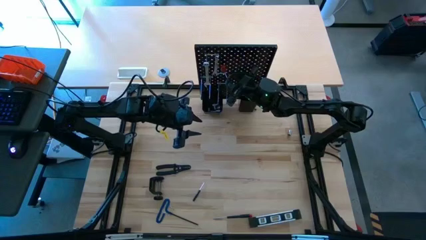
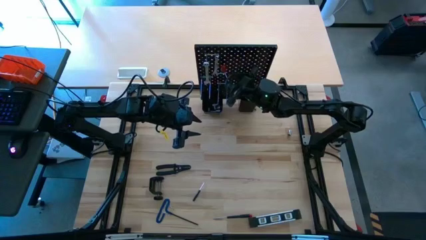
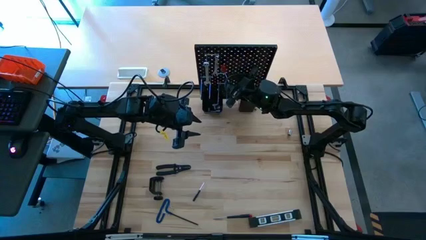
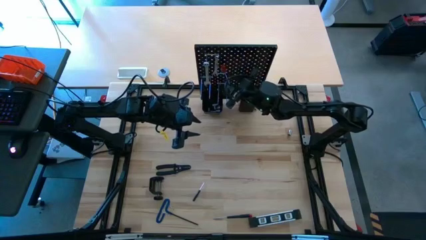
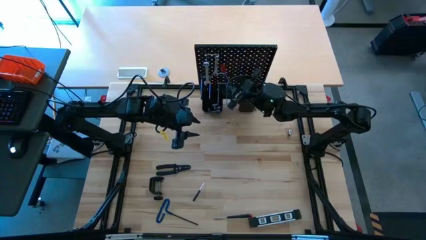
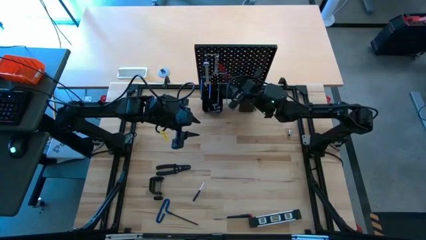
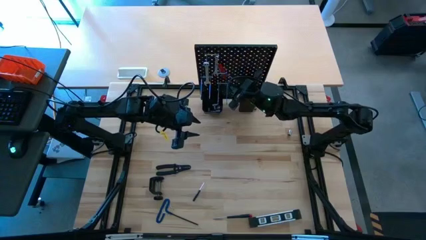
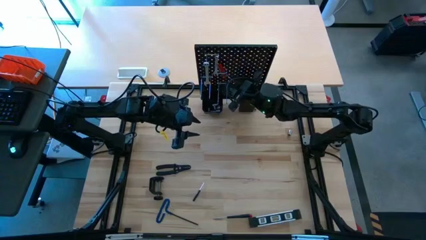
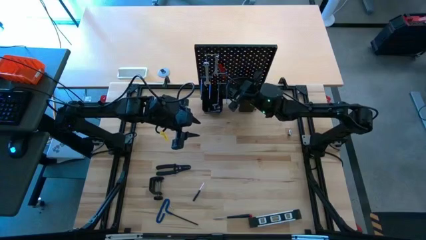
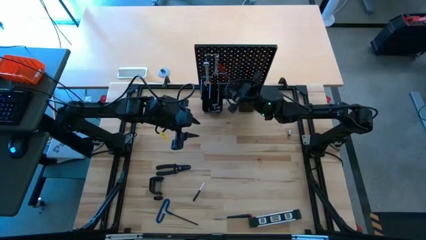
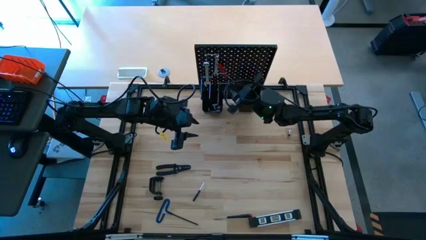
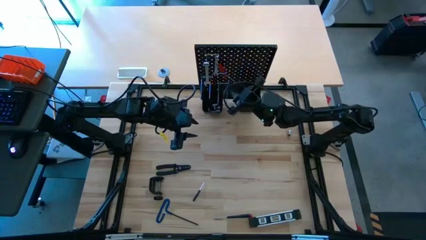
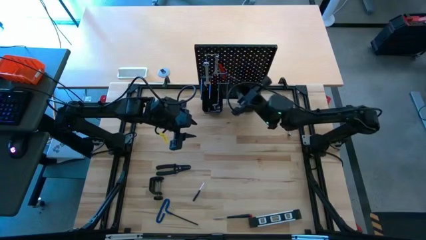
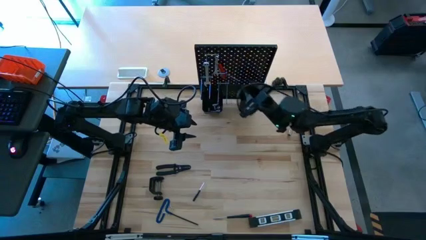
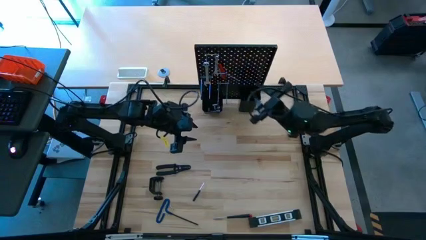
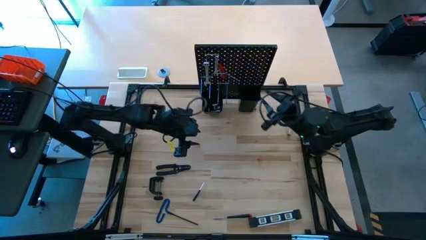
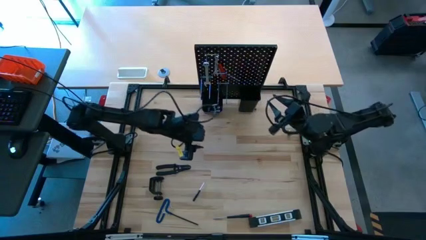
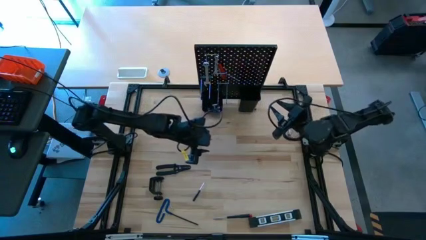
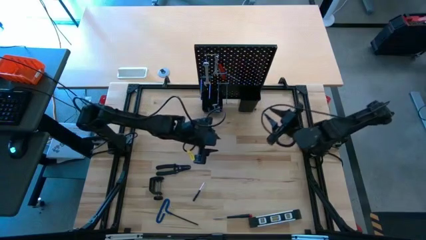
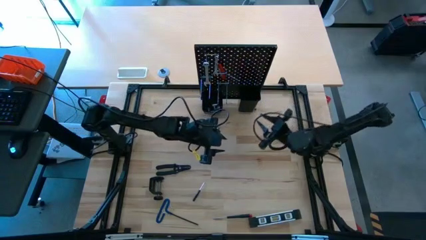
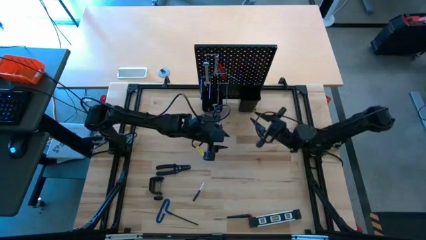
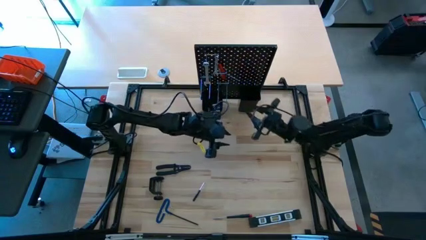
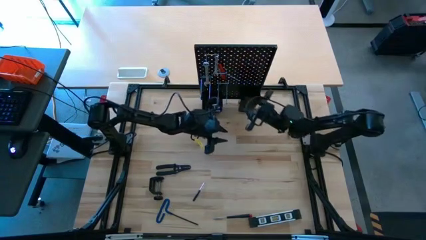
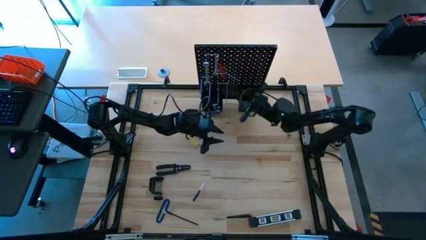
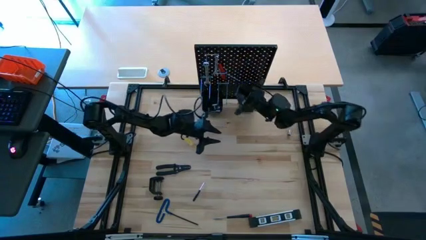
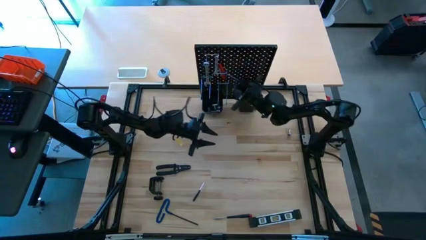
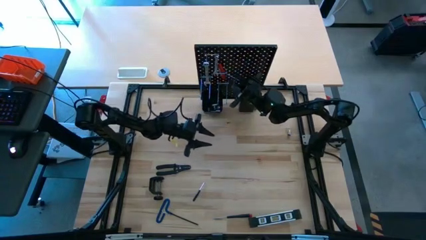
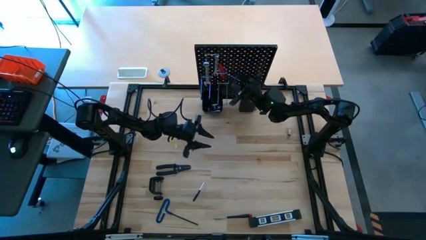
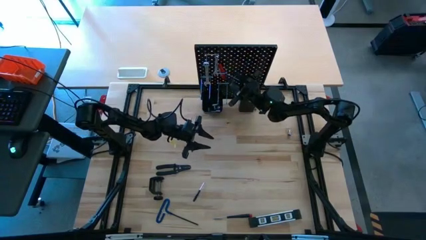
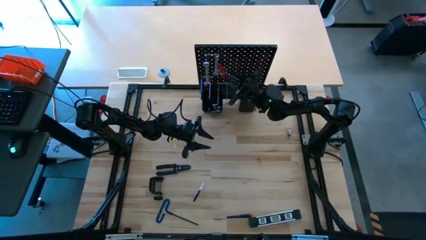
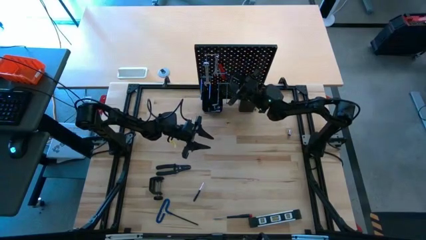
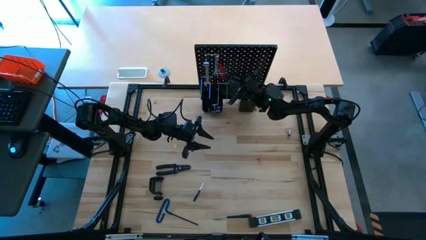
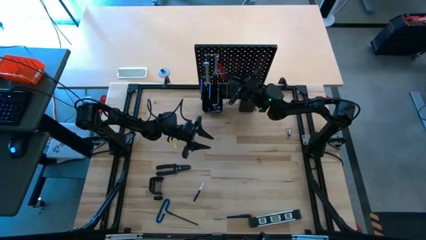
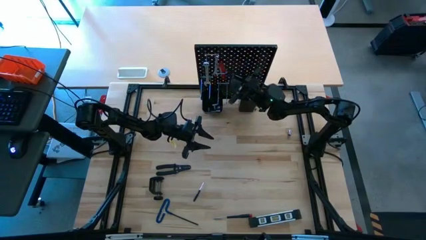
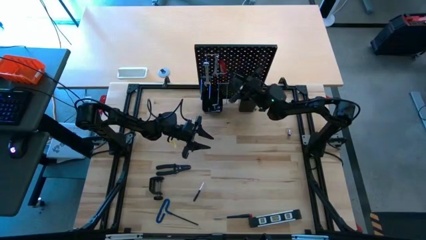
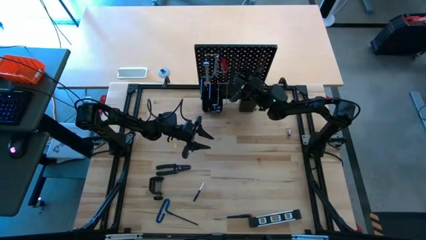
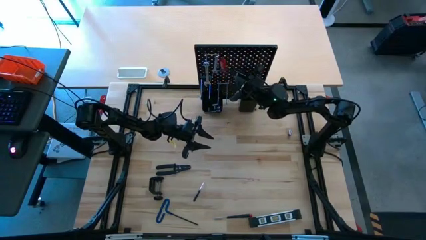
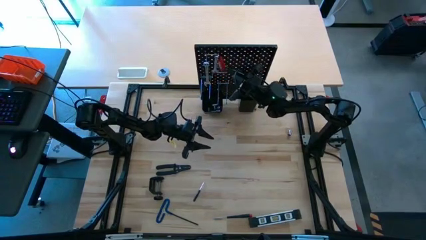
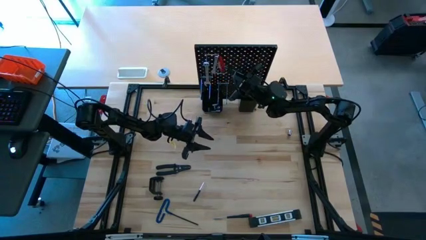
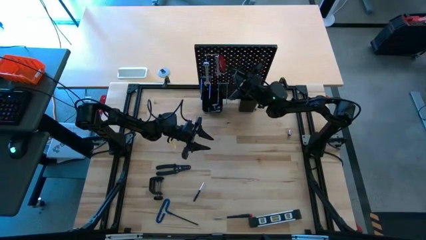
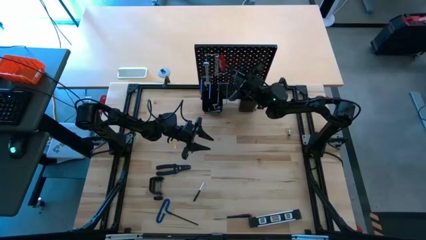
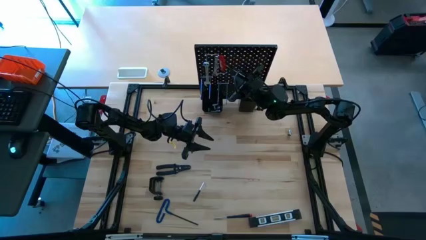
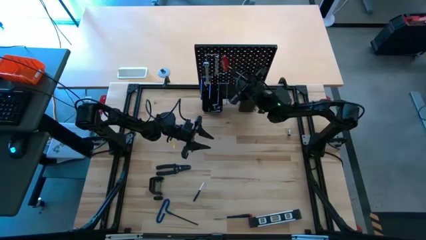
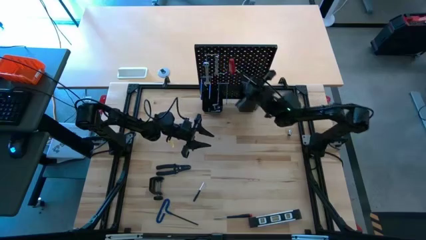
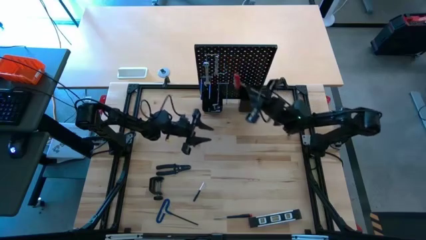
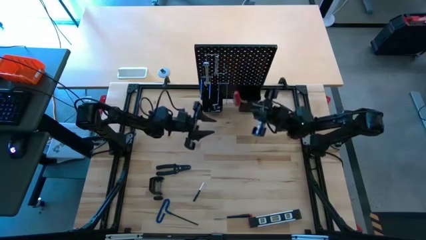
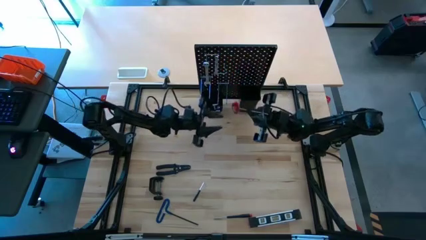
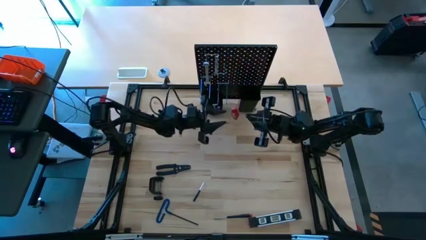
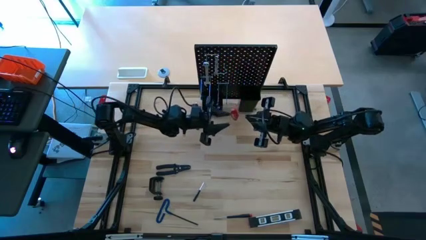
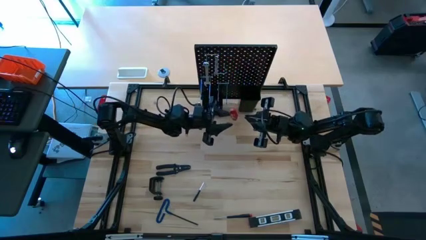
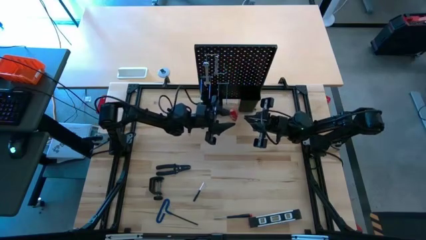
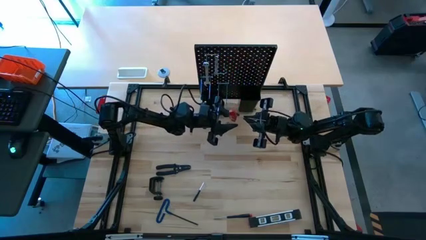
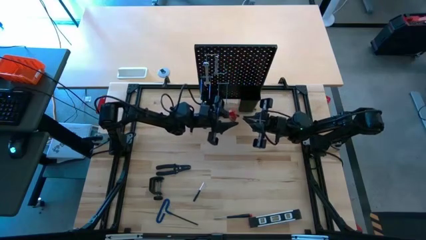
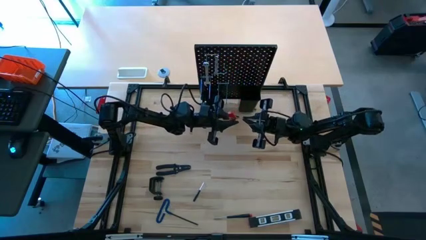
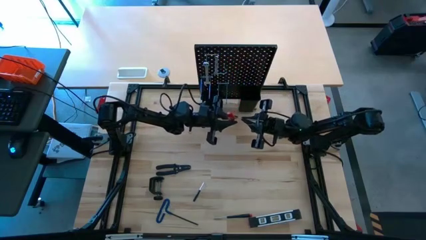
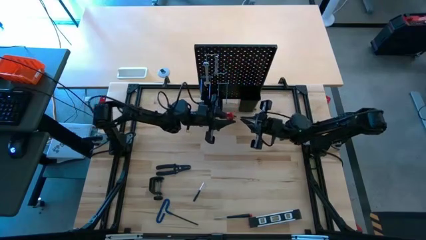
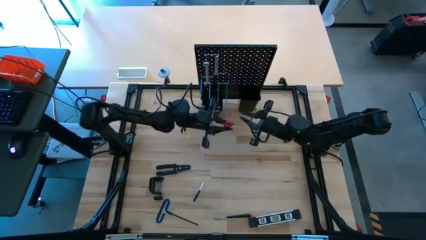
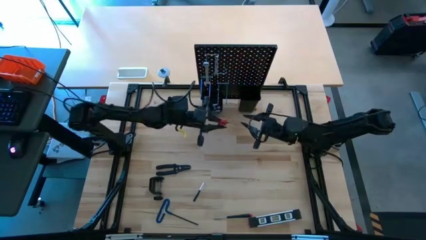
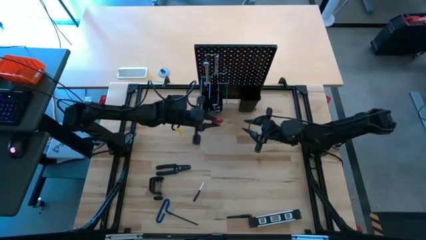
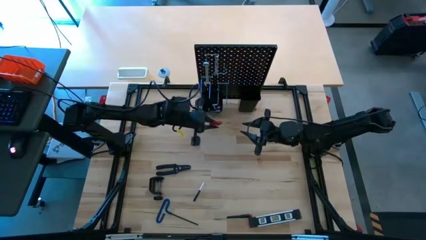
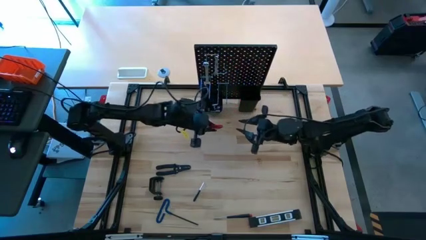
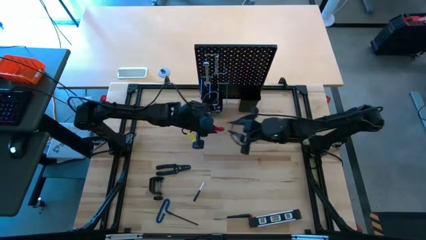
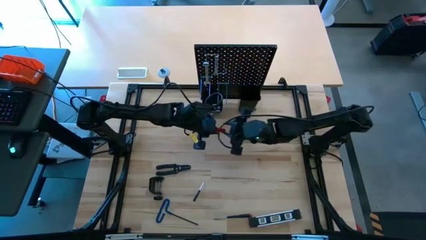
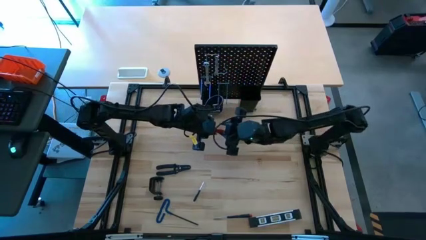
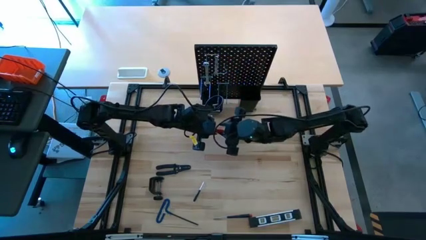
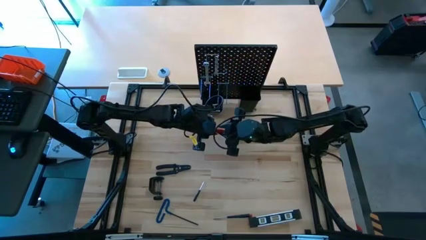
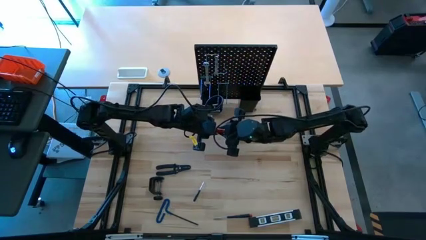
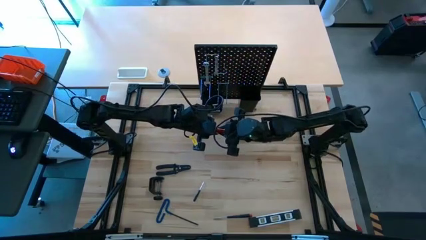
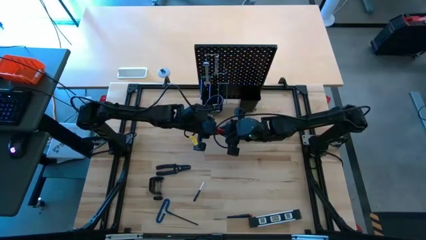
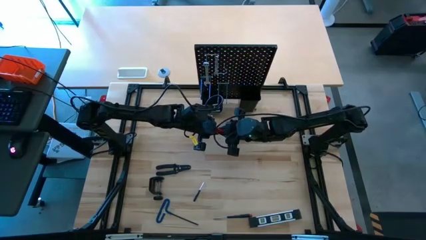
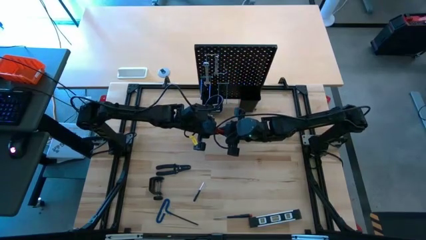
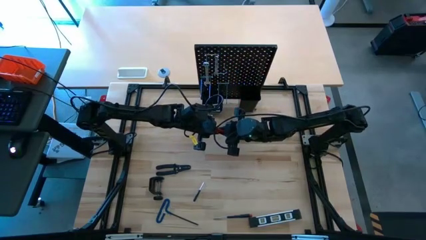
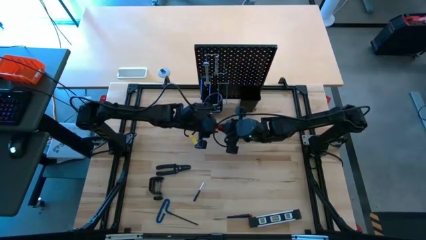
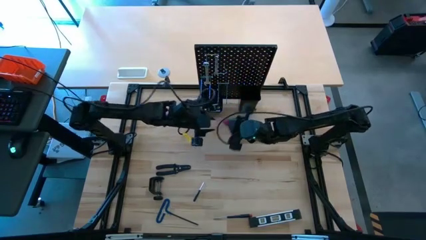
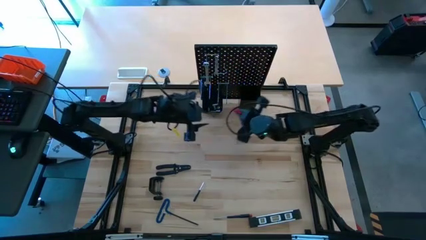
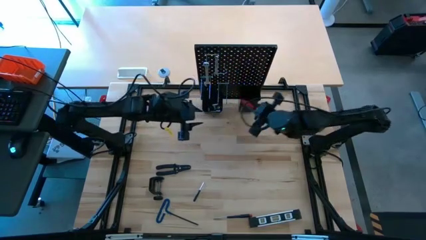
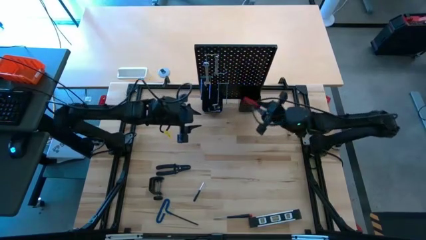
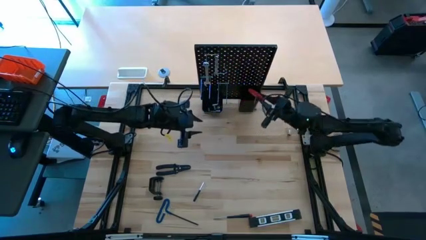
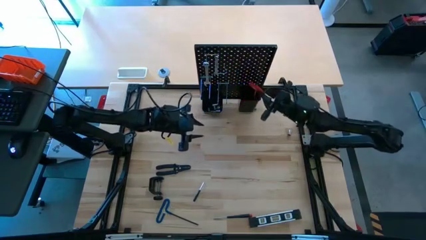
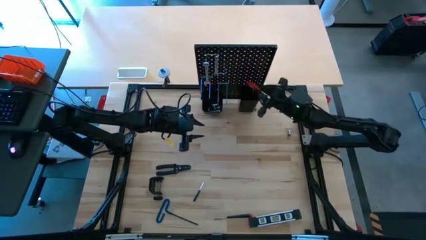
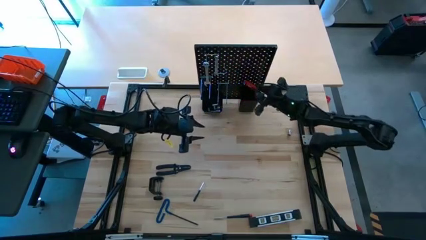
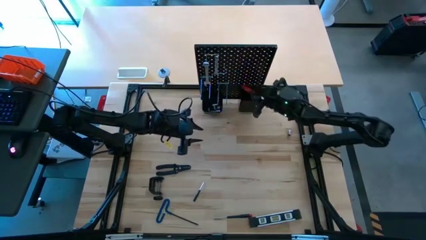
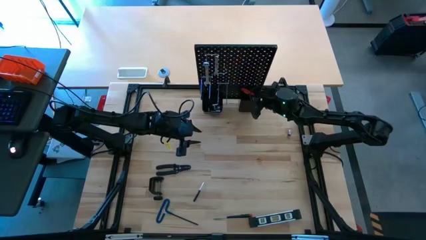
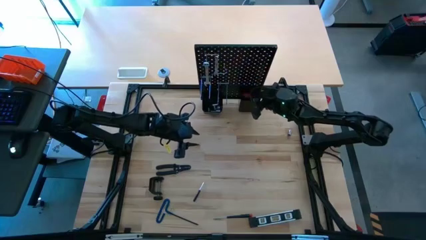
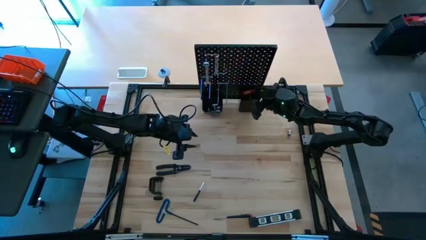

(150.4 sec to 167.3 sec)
Task: Hang tools onto peg board
Put the Allen wrench into the right bin on the pegboard
